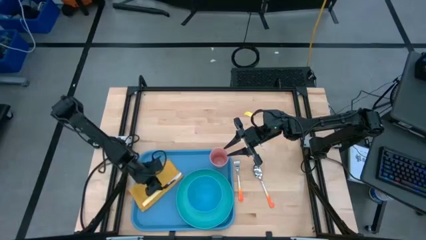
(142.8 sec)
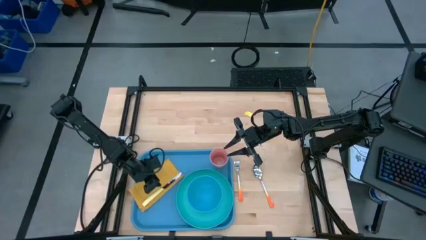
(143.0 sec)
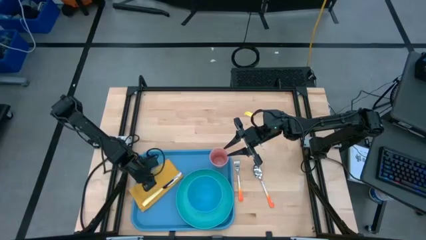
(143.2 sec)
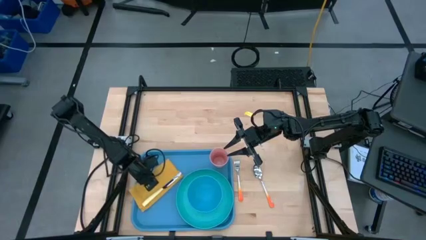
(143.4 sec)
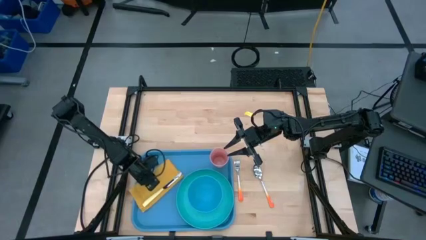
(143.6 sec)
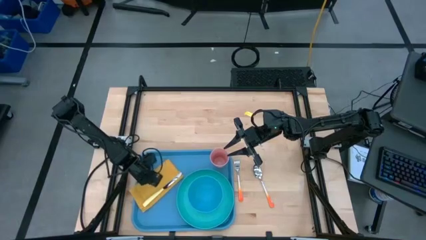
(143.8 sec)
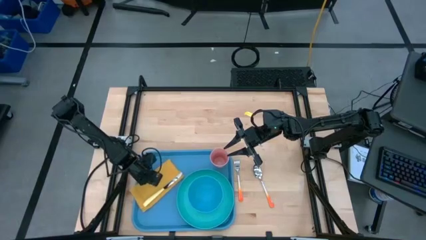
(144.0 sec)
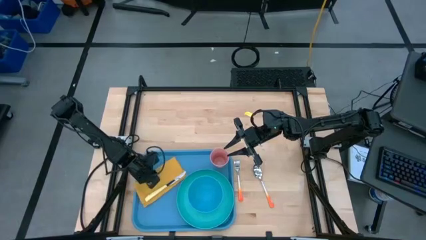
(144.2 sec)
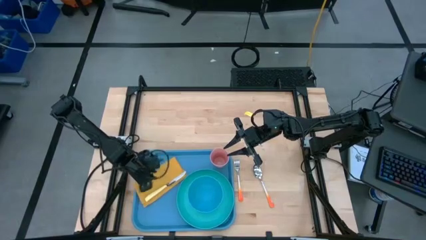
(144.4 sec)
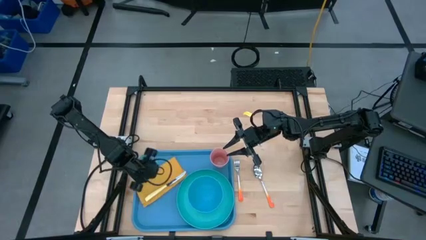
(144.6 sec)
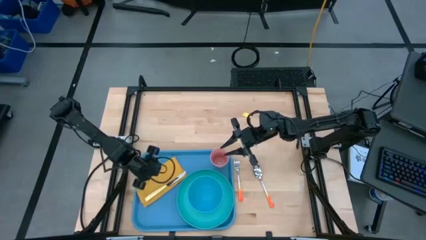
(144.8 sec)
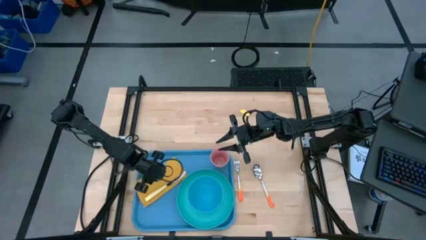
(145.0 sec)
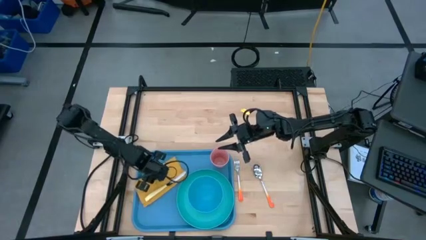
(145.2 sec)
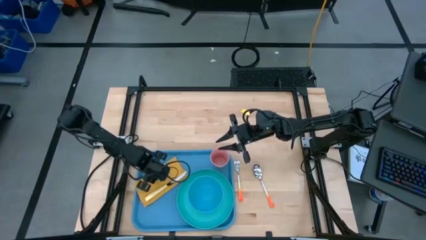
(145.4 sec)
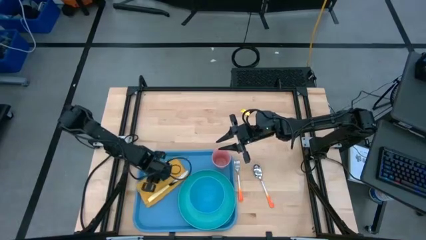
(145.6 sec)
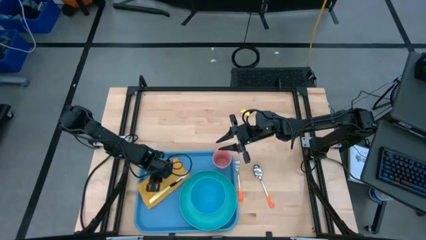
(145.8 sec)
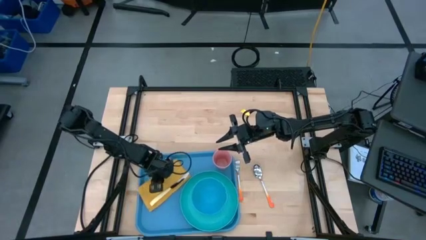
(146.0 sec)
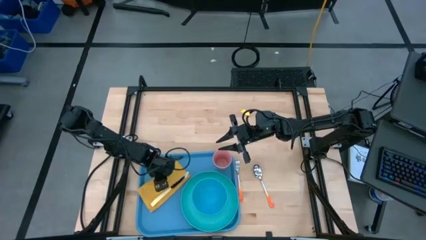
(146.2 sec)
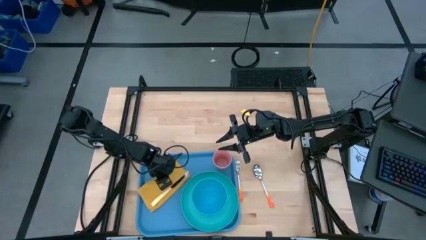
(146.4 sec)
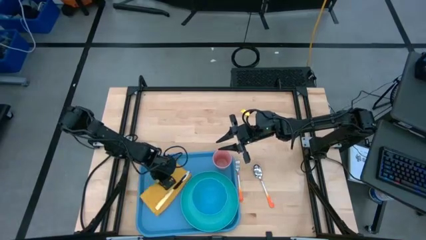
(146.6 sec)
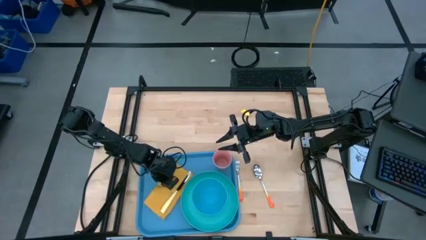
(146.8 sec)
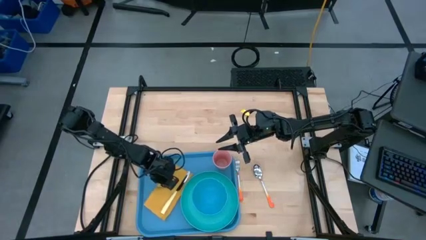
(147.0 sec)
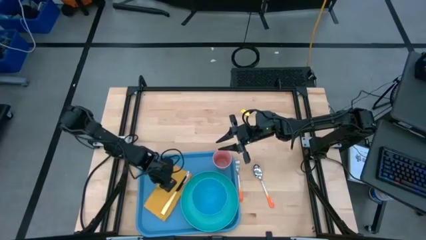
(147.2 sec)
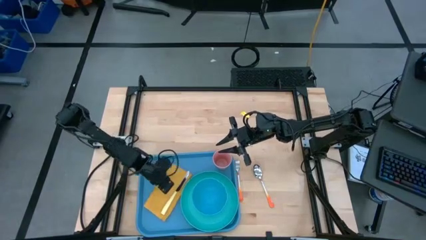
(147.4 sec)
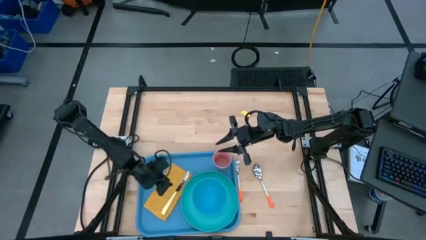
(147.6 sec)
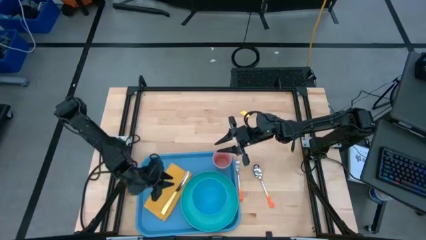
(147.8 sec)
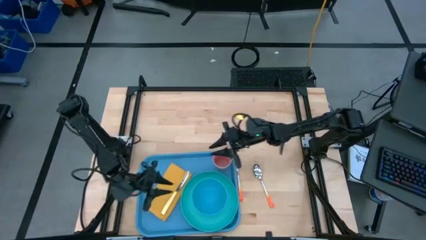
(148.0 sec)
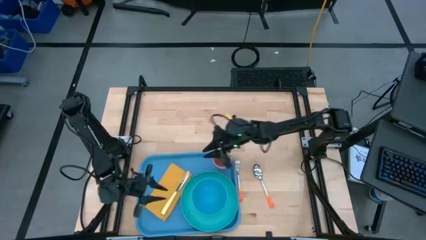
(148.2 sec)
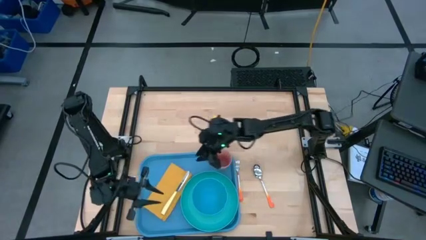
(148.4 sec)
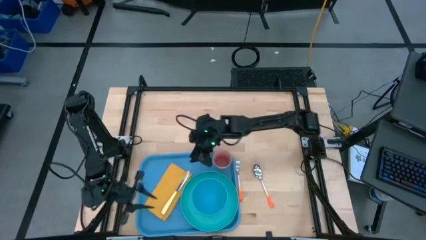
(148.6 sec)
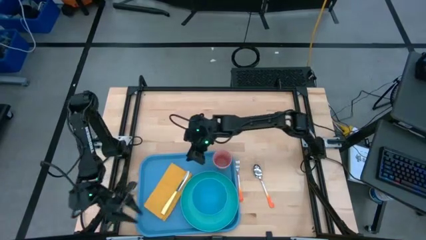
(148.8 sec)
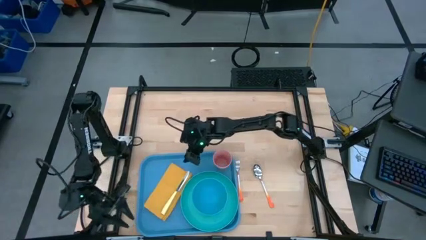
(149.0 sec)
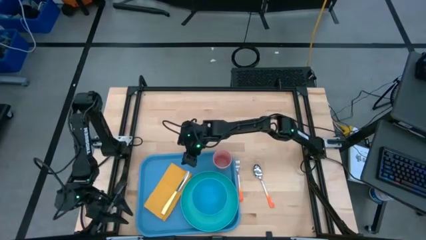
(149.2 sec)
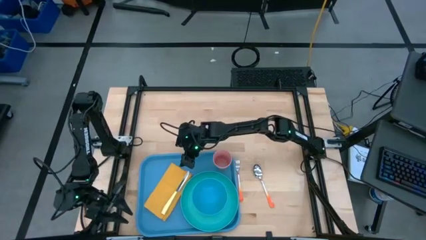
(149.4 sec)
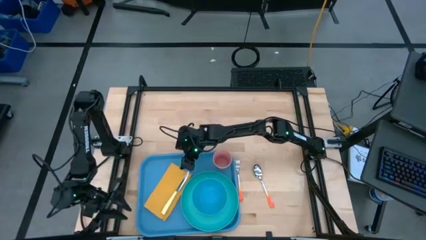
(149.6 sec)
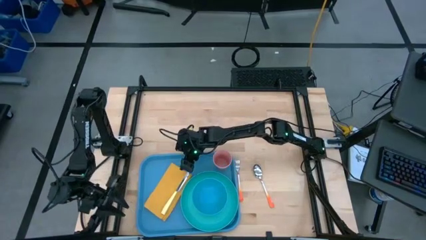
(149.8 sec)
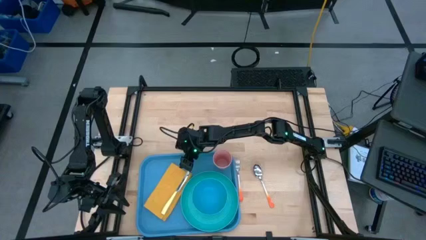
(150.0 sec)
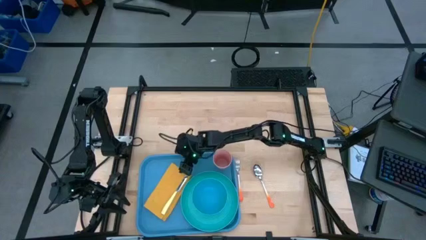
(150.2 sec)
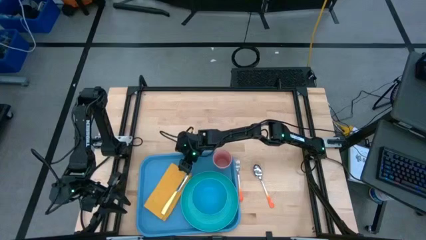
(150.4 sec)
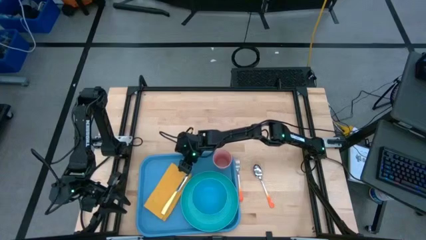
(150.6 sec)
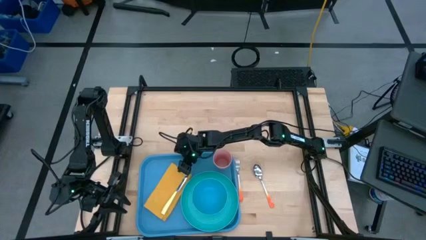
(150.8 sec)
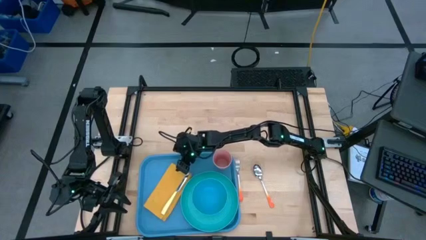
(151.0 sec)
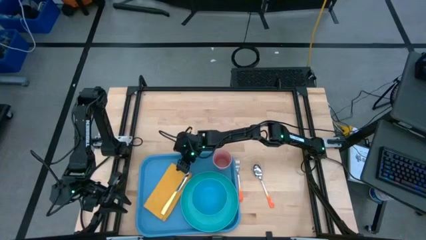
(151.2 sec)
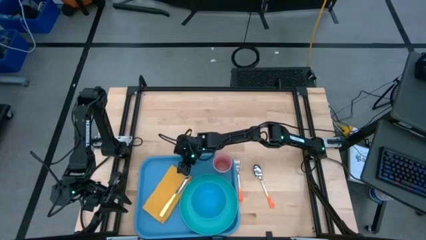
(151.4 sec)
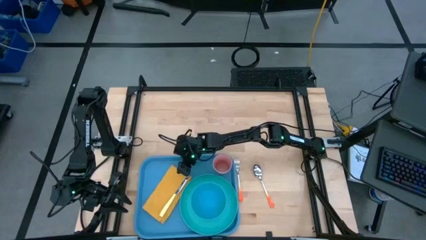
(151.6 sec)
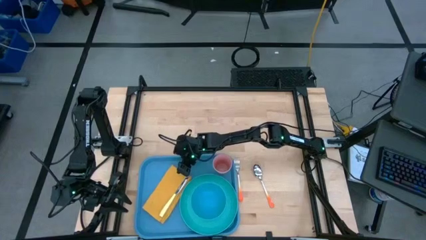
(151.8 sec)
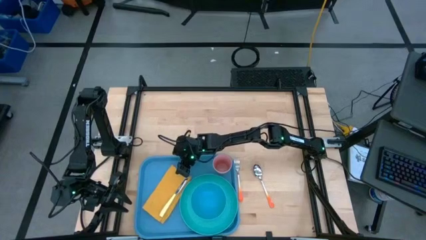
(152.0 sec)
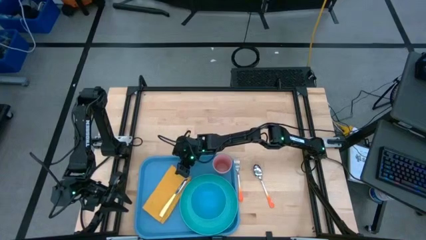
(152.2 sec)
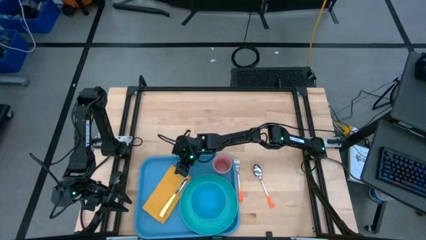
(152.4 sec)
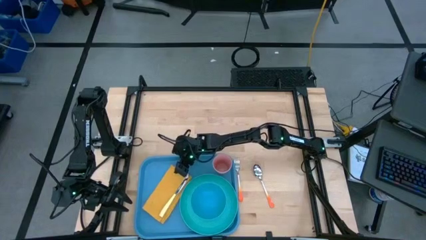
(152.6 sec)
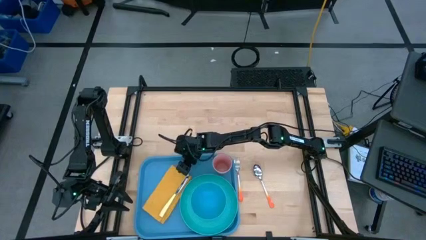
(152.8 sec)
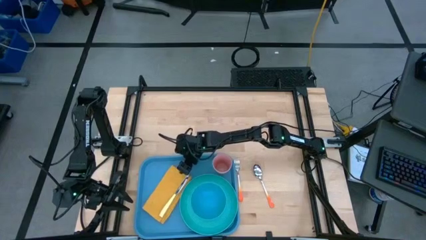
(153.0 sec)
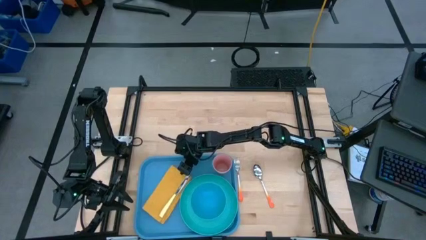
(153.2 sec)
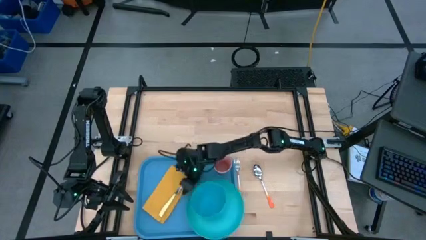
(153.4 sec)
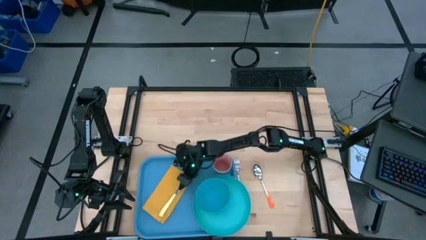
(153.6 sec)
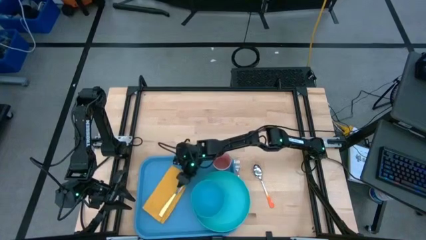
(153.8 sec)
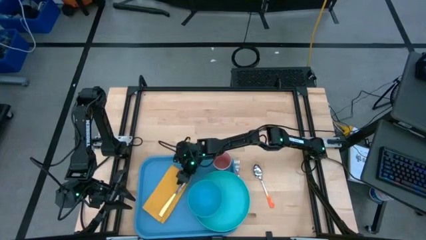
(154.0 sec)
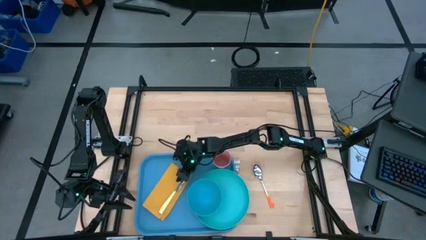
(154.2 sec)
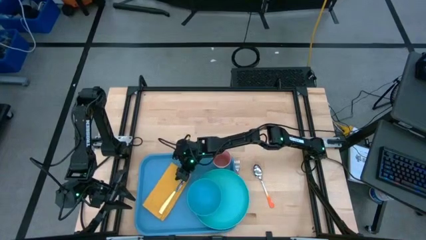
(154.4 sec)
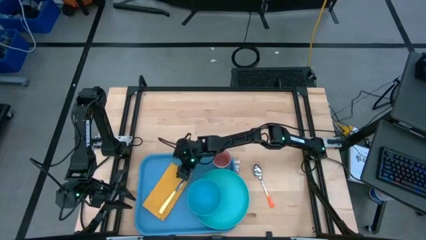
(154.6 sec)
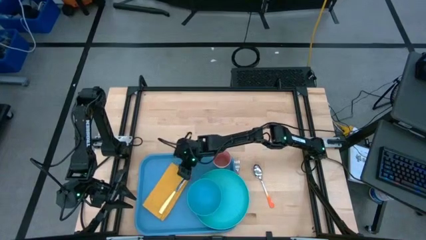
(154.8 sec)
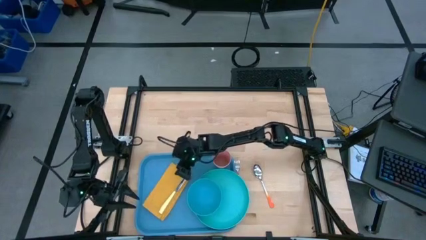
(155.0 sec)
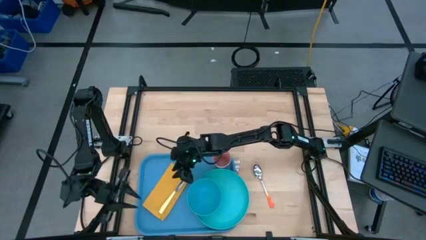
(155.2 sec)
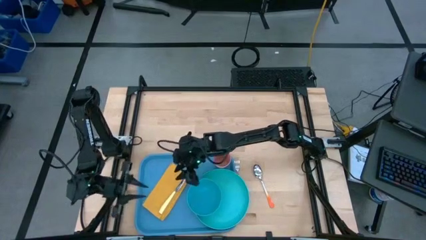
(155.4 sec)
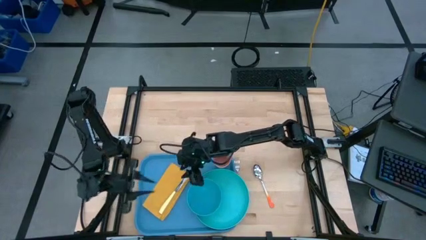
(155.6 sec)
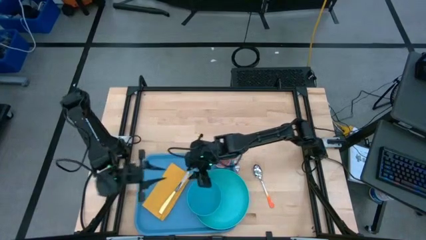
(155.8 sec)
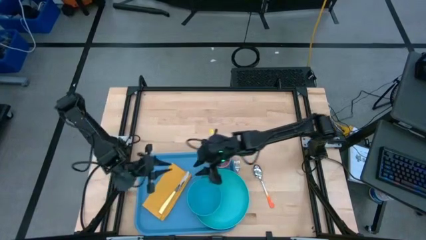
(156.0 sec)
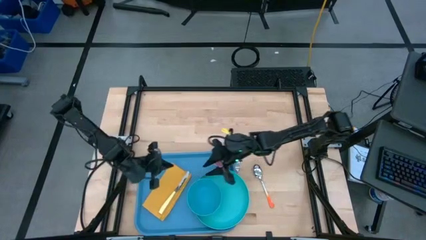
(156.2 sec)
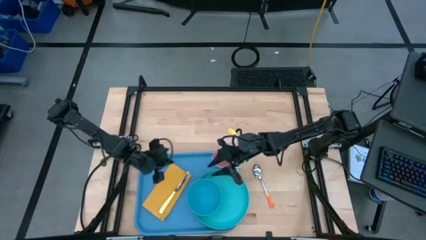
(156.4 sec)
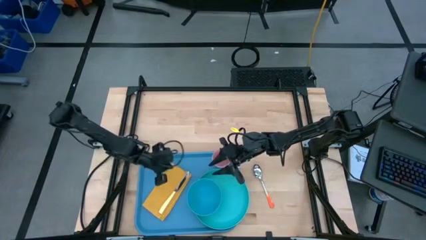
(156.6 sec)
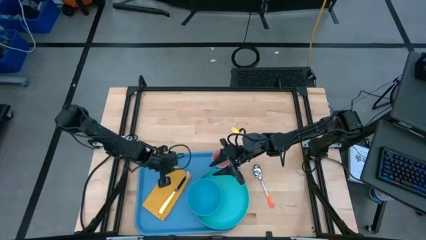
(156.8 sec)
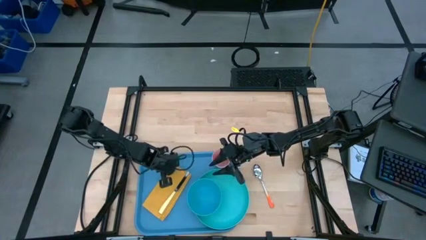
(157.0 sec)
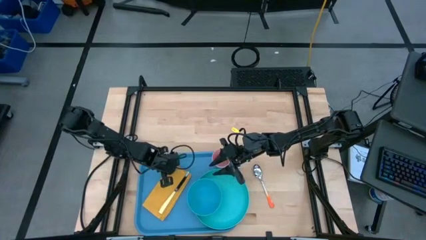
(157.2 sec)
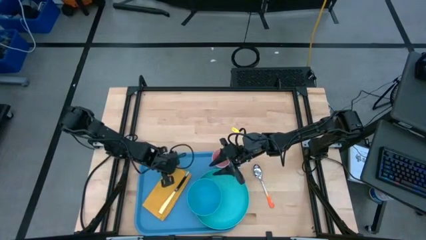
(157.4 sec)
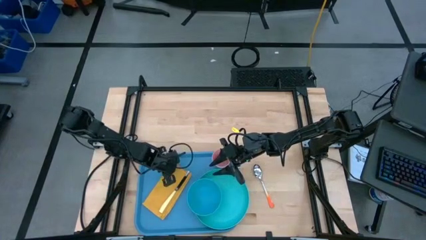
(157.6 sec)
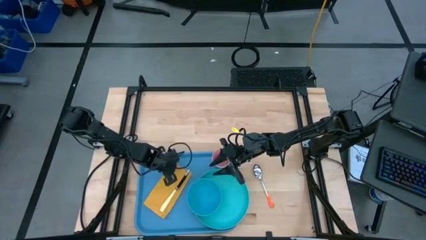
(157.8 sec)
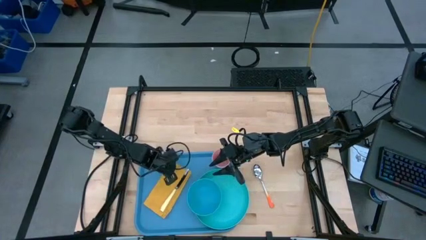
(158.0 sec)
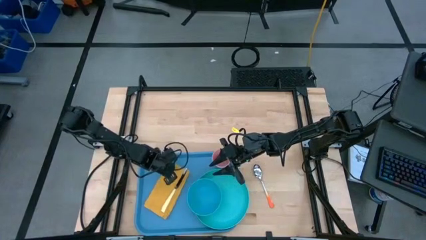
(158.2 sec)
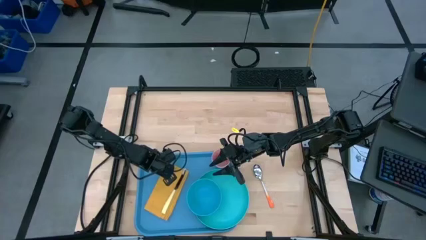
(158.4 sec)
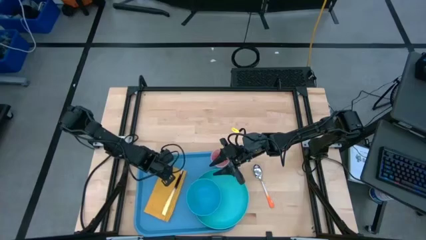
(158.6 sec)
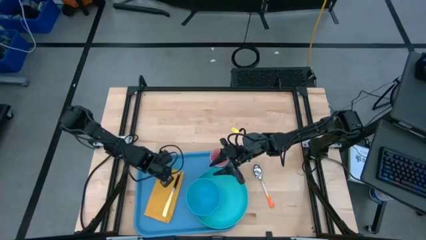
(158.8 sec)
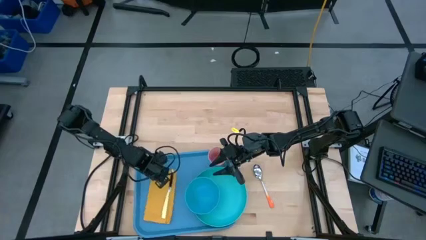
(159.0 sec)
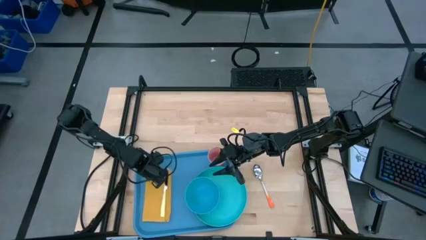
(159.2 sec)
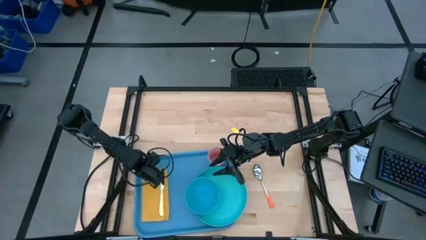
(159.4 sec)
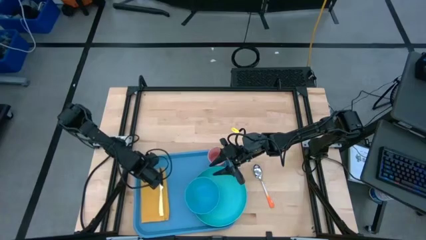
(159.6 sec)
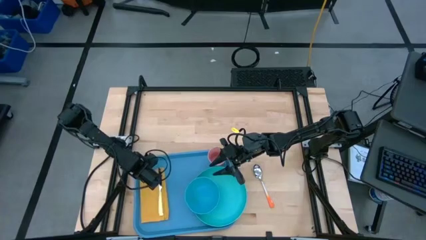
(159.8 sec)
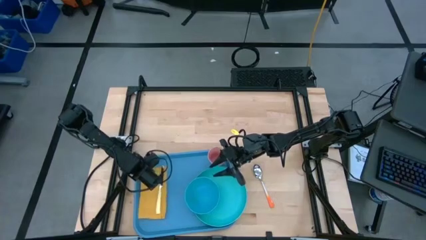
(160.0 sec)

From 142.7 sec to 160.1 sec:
Task: Set up tray
Adjust the yellow table napkin on the blue tray
